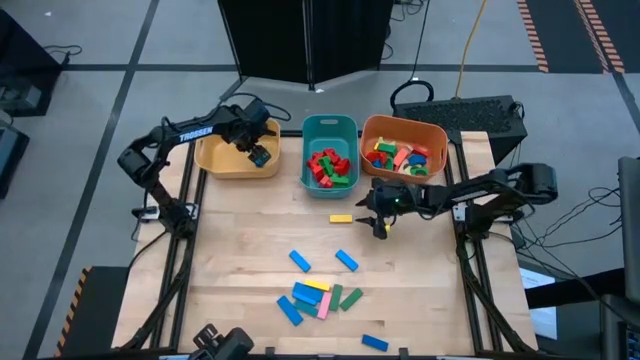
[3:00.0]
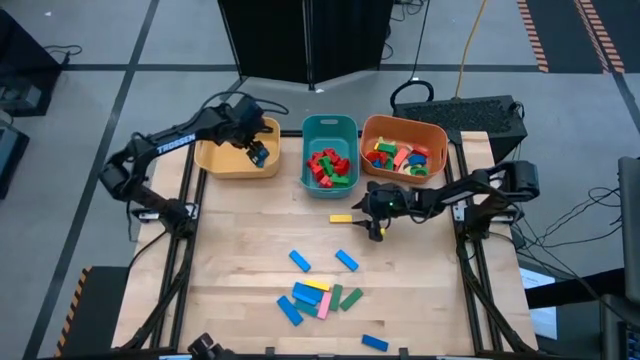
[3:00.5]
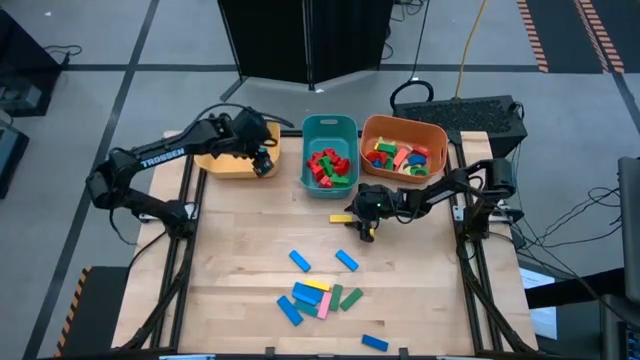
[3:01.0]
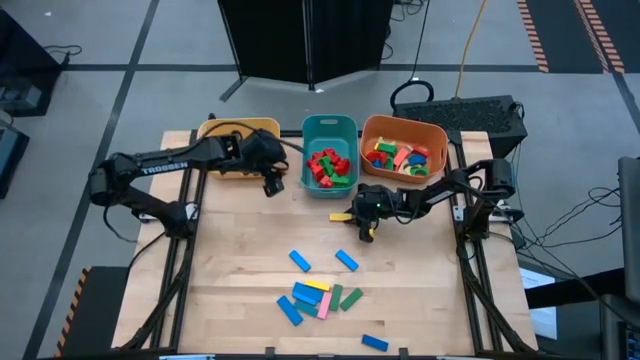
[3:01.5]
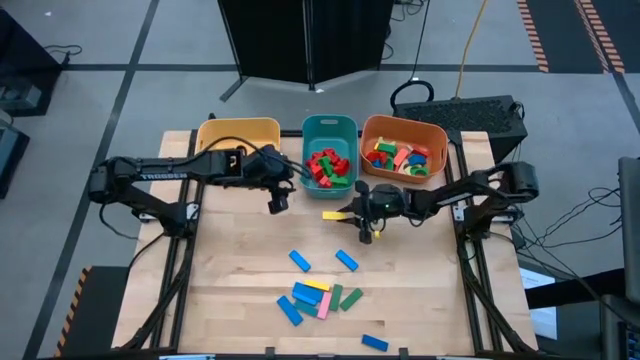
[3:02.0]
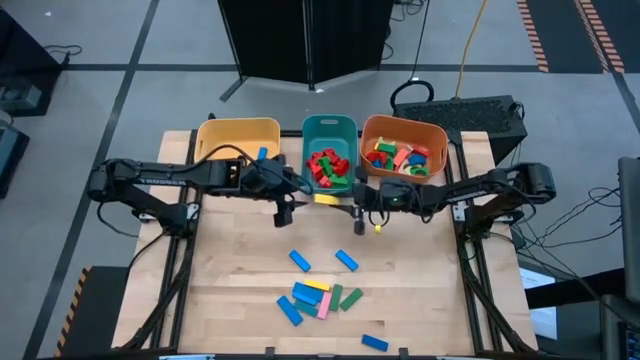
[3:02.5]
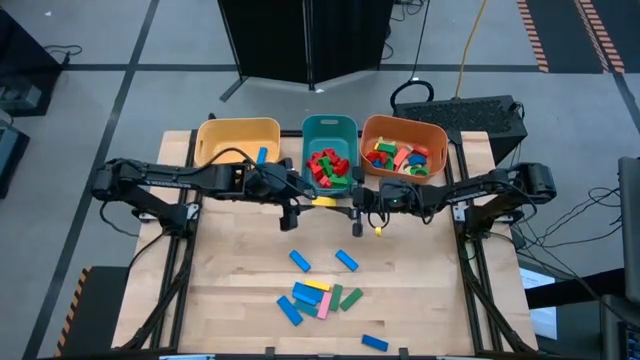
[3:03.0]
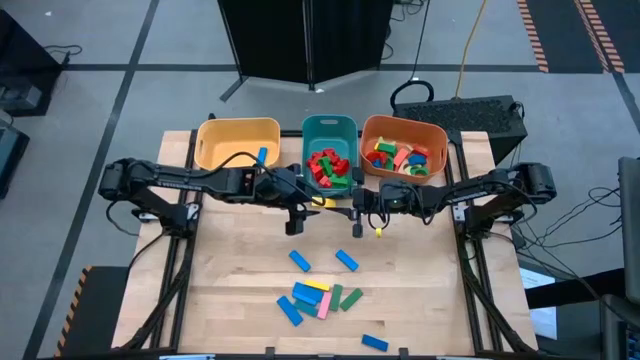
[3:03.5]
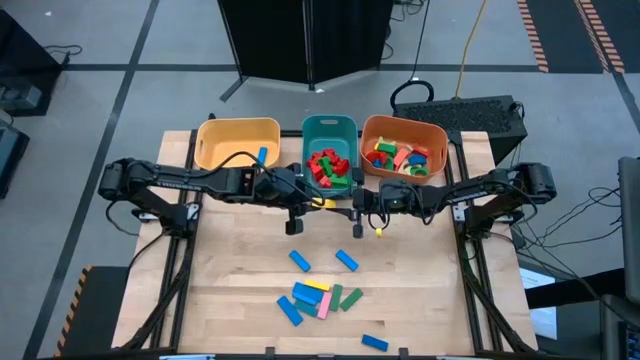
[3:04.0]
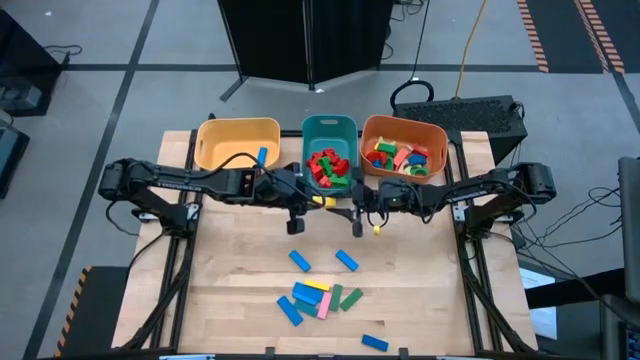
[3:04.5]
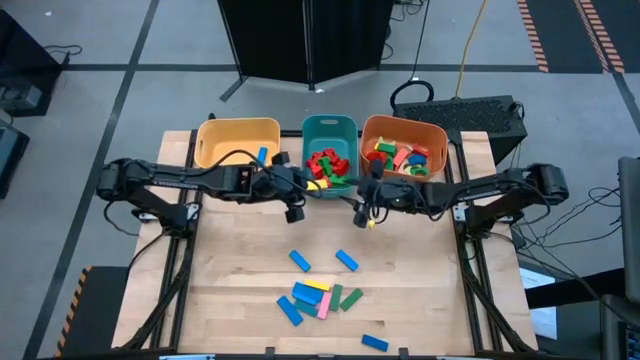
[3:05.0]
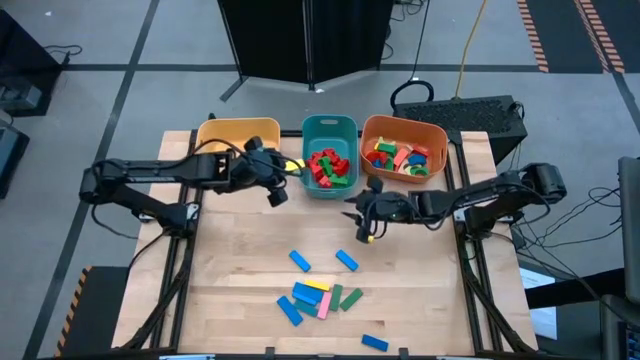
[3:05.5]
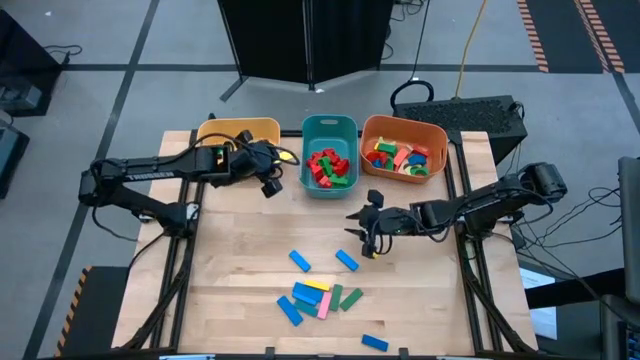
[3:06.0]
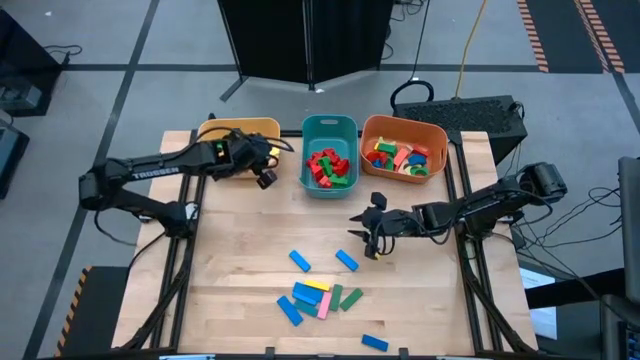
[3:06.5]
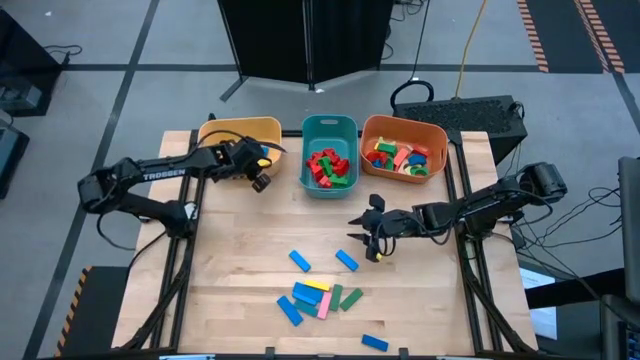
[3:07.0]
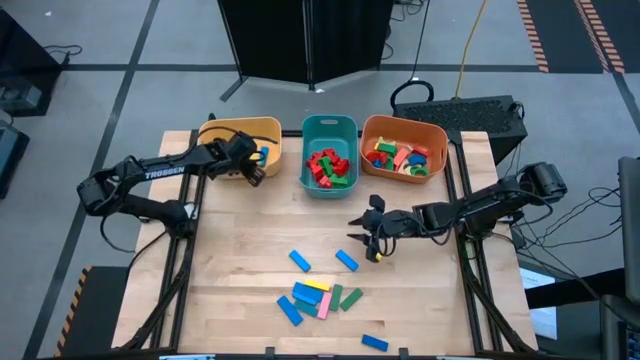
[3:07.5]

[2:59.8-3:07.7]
Task: Sort blocks by size
Put the yellow rectangle block into the yellow bin

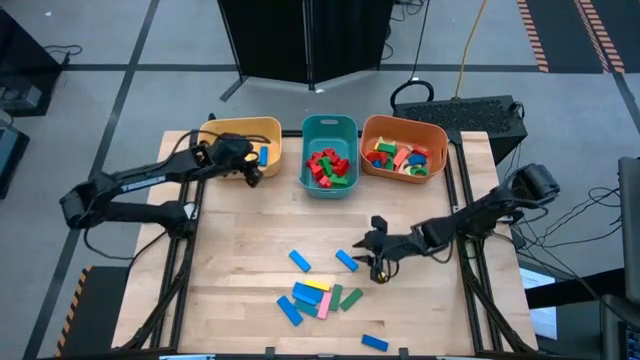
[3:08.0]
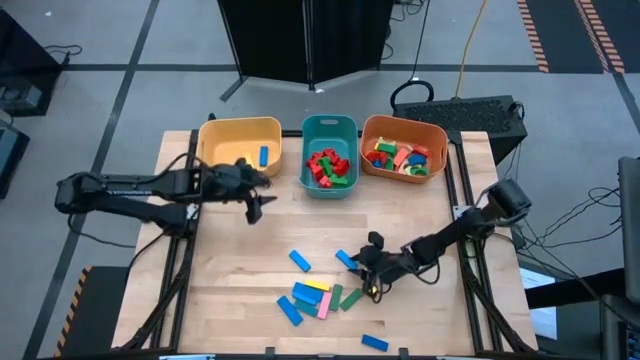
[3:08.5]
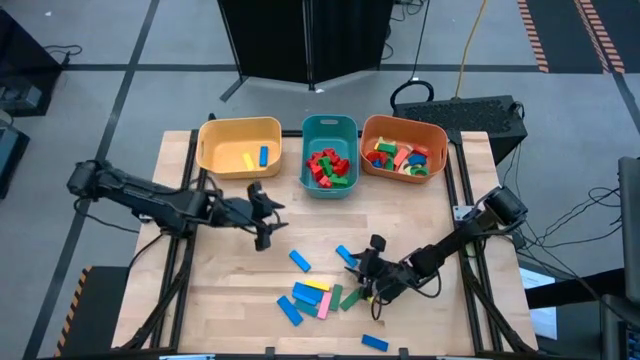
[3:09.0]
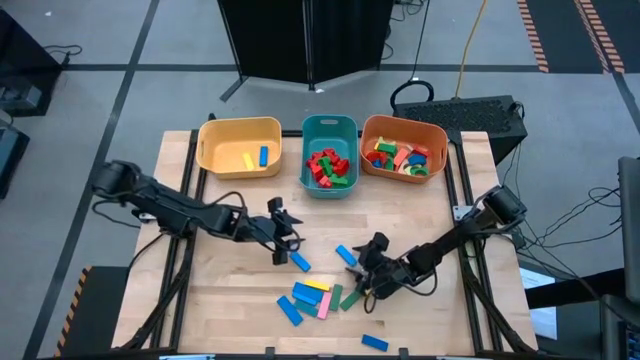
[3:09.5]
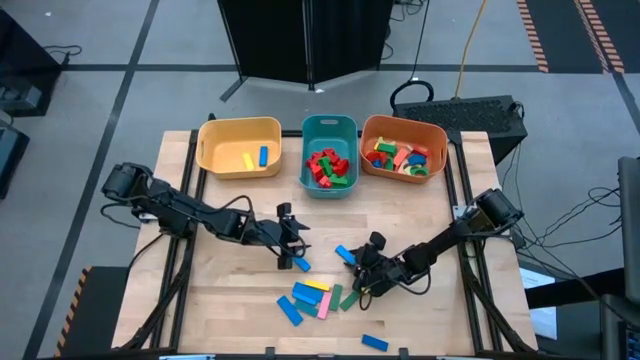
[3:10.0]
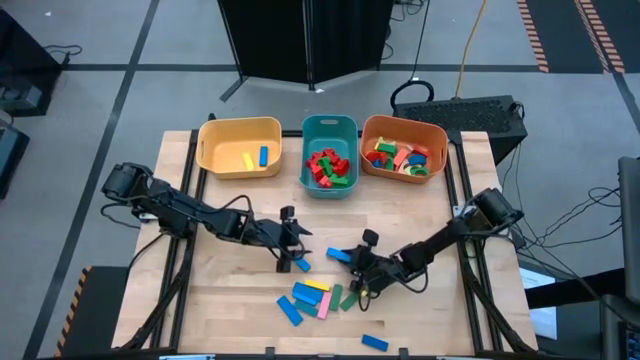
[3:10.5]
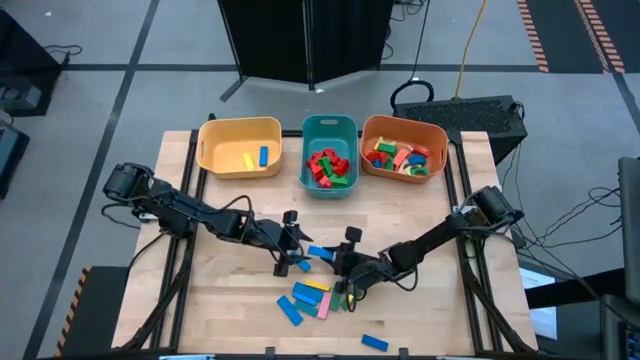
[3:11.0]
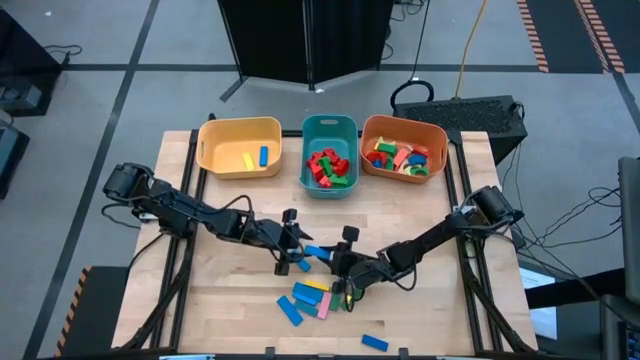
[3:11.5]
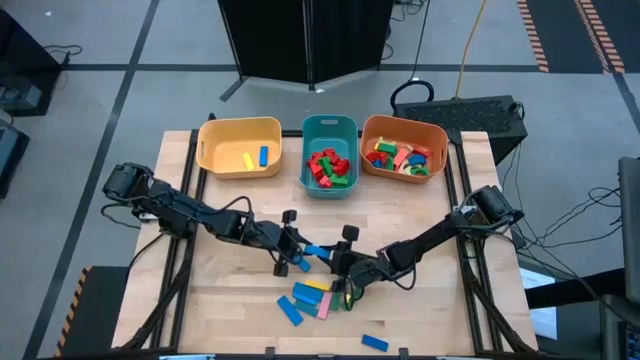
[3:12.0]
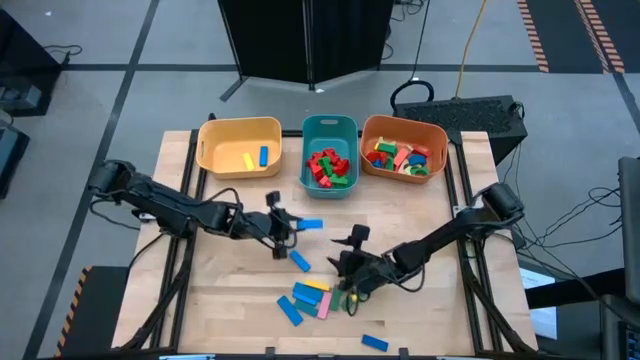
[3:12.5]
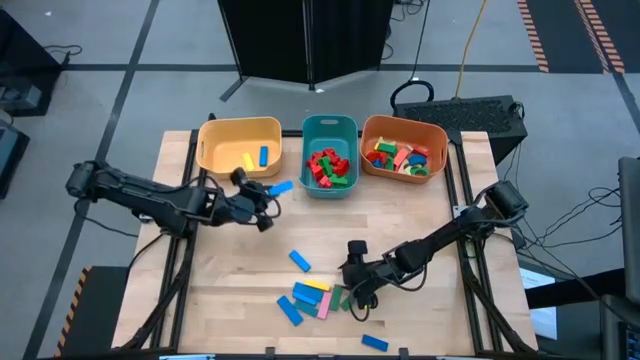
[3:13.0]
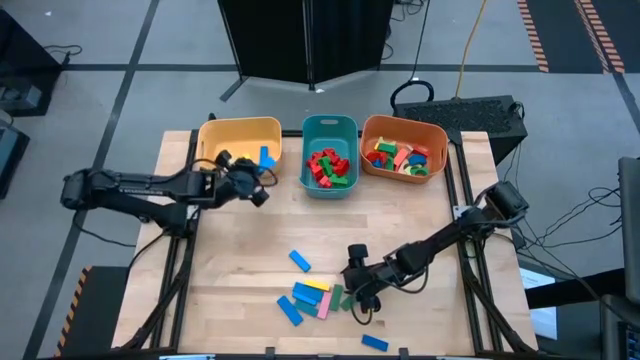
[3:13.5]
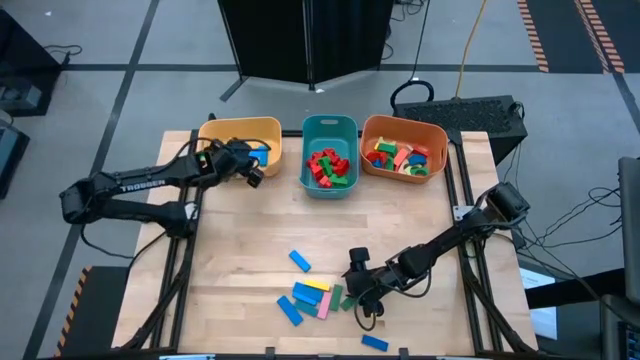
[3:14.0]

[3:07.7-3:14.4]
Put the blue rectangle block into the yellow bin

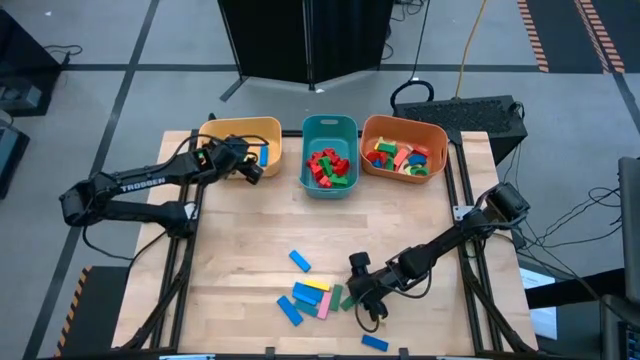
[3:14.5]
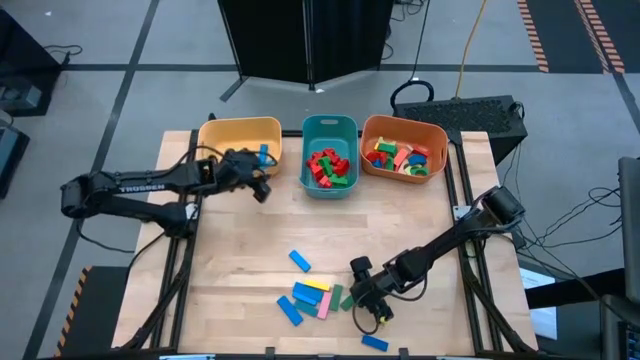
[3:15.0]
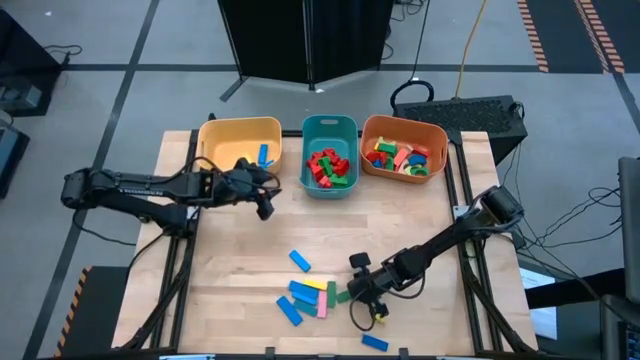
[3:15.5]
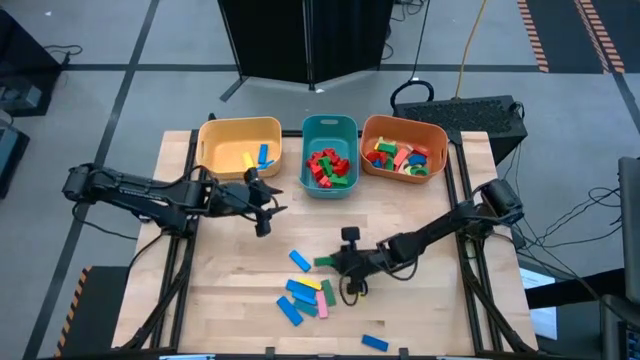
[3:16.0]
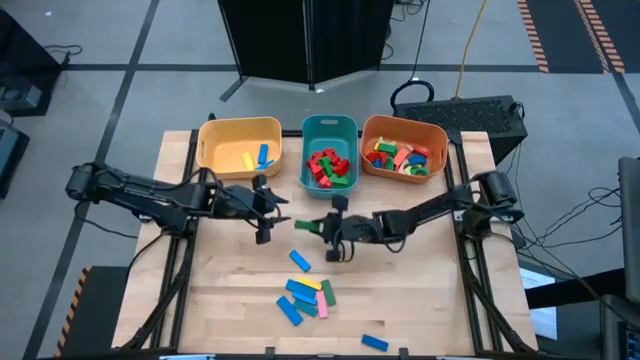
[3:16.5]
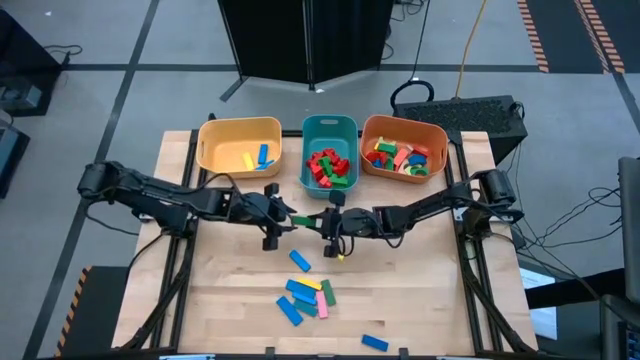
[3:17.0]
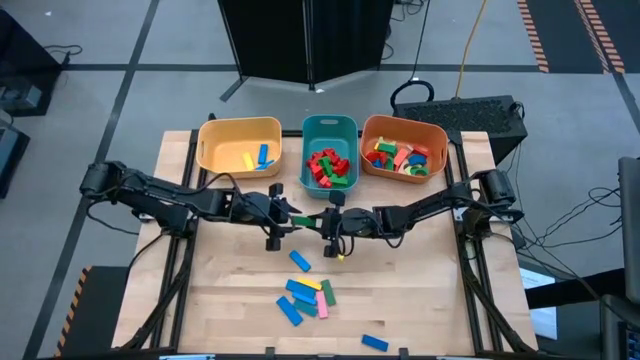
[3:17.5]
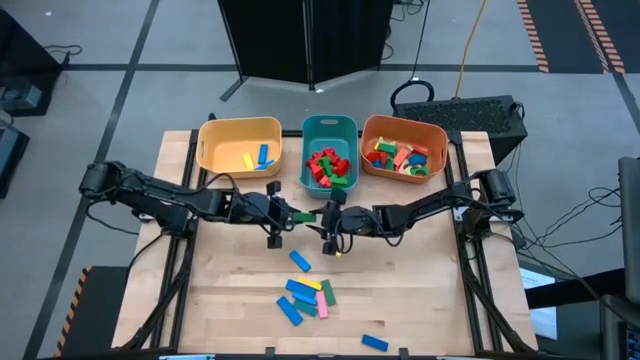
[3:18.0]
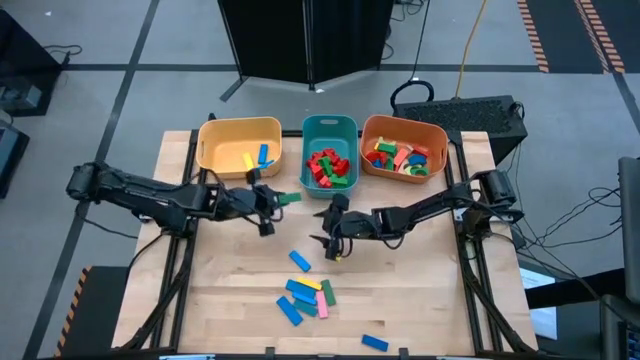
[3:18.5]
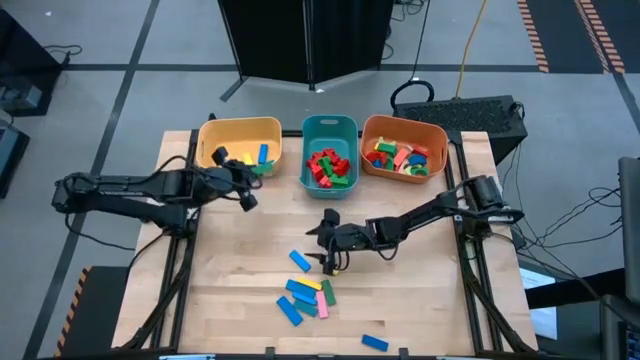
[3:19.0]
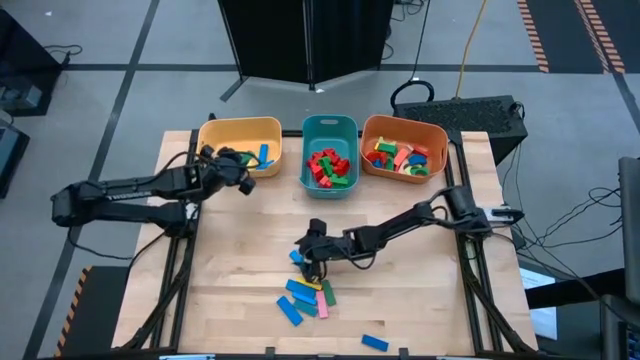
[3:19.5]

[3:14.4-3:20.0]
Put the green rectangle block into the yellow bin

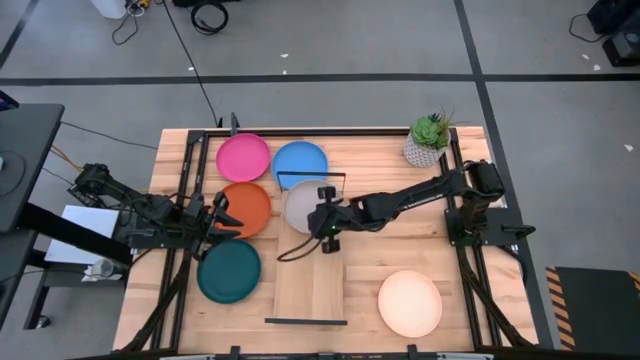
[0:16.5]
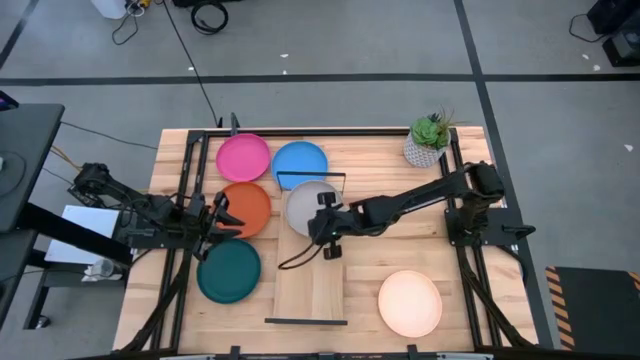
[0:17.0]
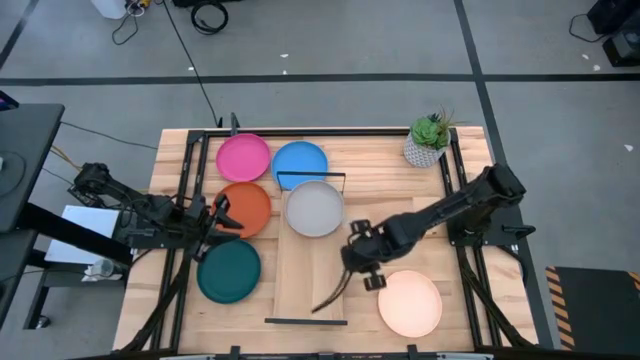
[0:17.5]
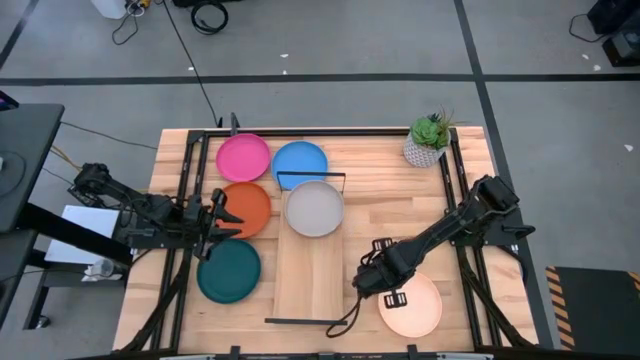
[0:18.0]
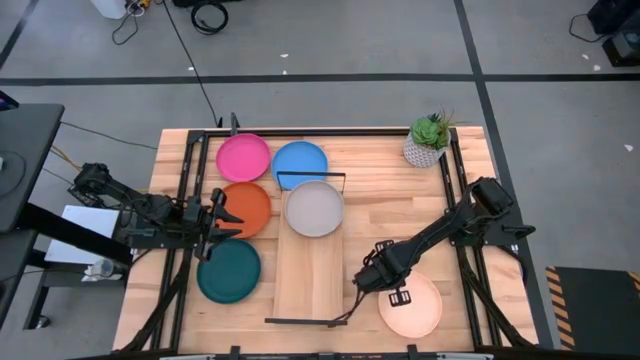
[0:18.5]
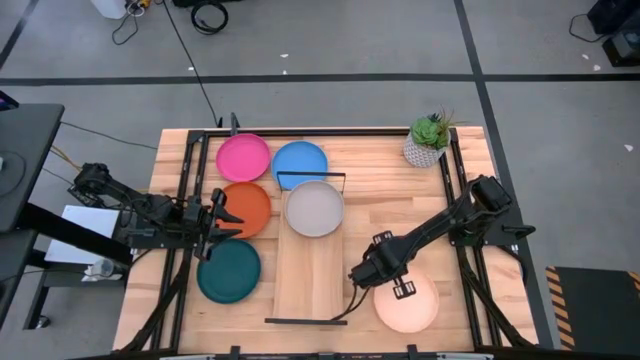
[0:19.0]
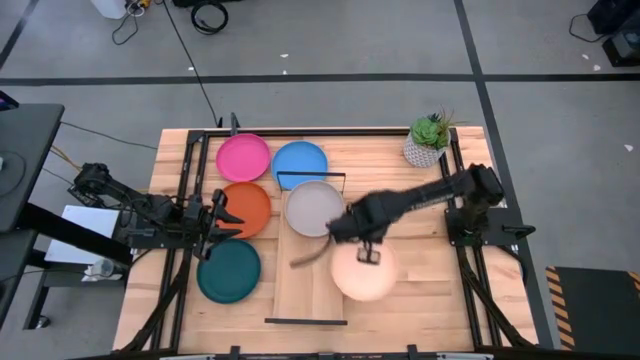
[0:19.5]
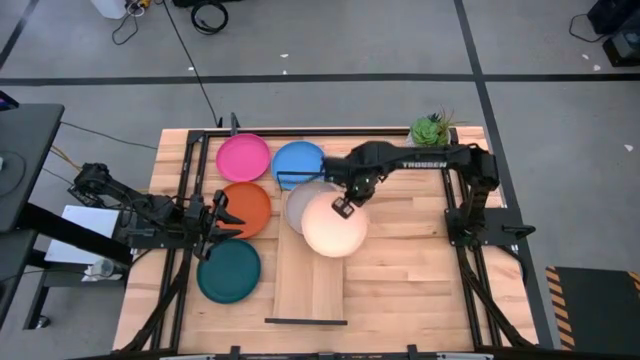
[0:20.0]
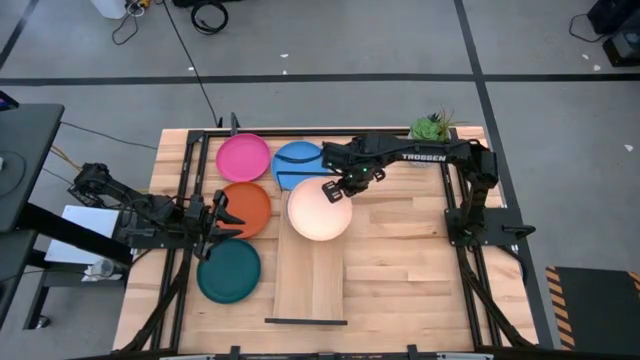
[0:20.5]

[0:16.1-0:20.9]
Task: Place and stack plates onto a shelf
Stack the light orange plate on top of the gray plate on the shelf
